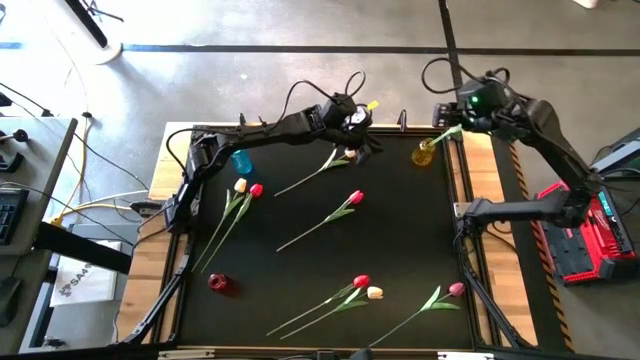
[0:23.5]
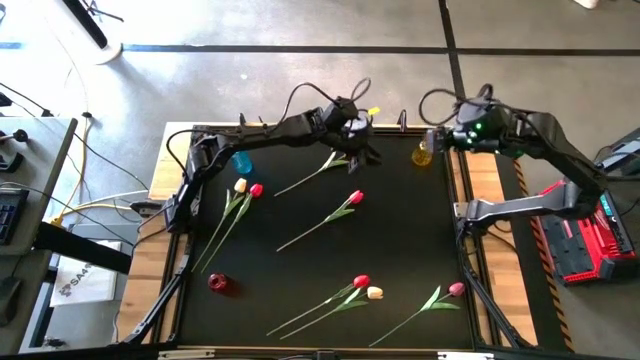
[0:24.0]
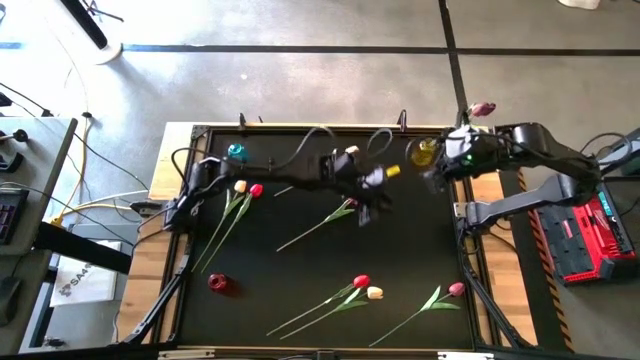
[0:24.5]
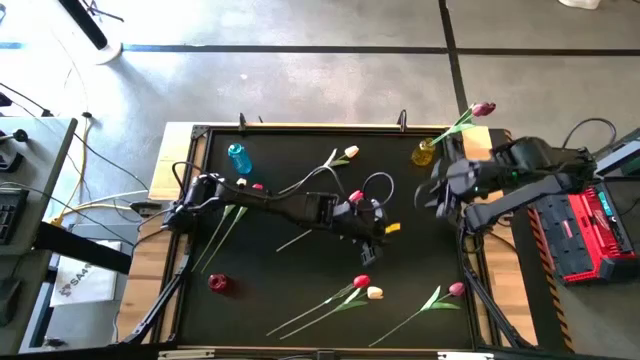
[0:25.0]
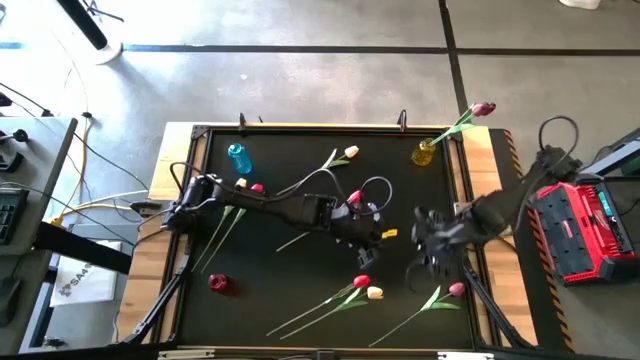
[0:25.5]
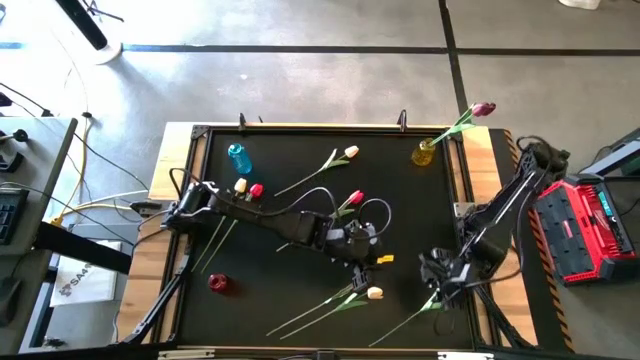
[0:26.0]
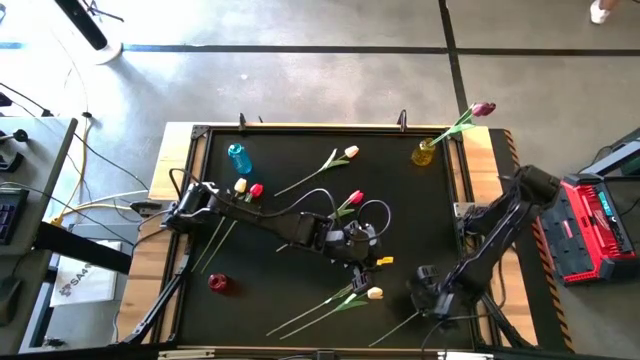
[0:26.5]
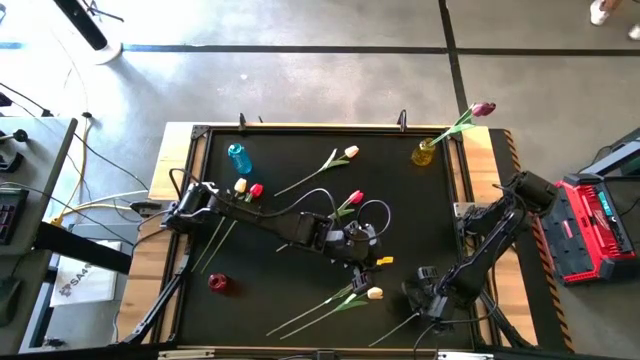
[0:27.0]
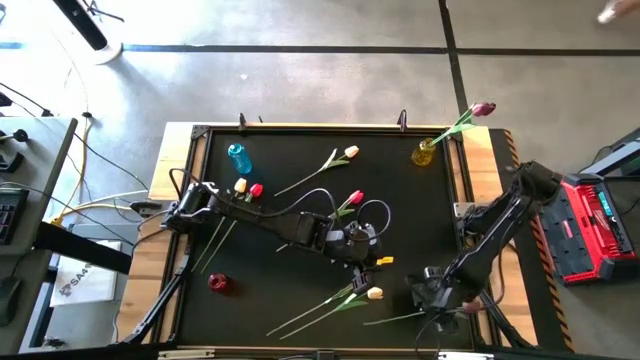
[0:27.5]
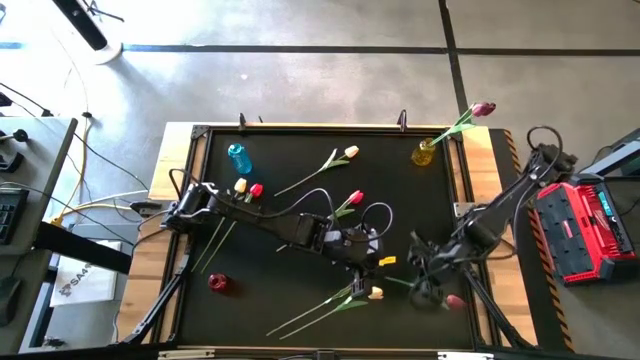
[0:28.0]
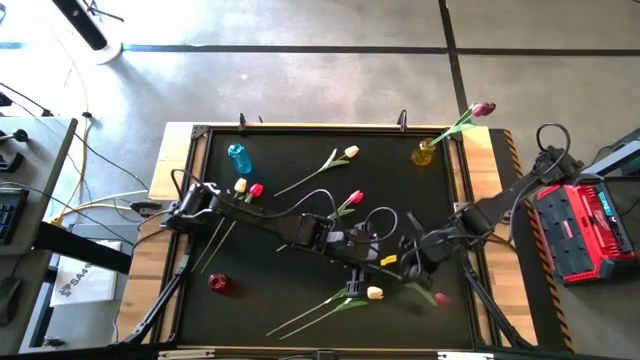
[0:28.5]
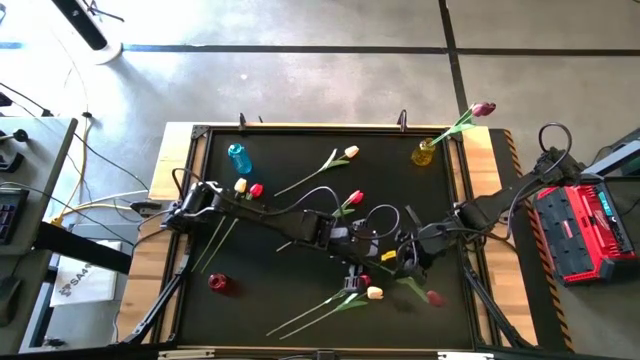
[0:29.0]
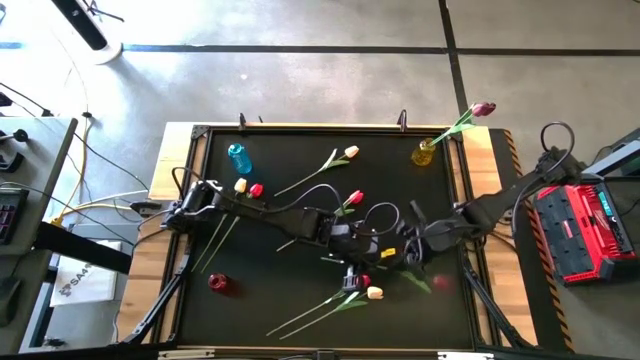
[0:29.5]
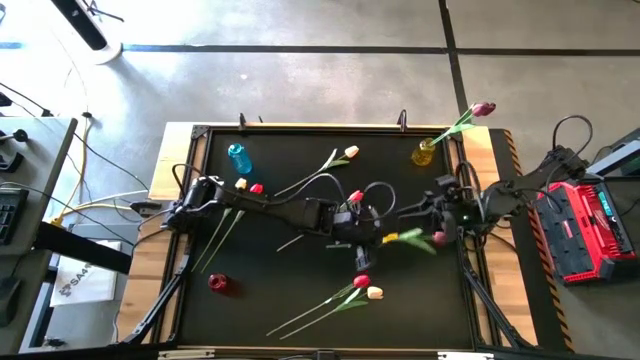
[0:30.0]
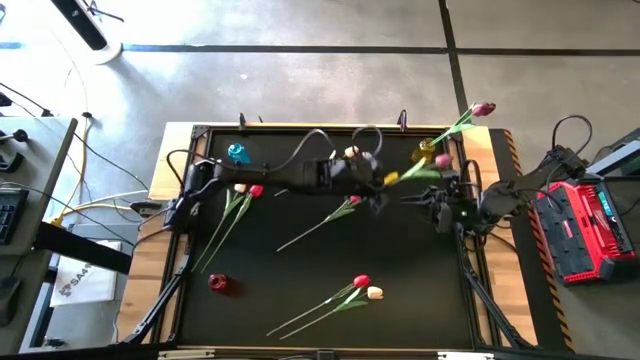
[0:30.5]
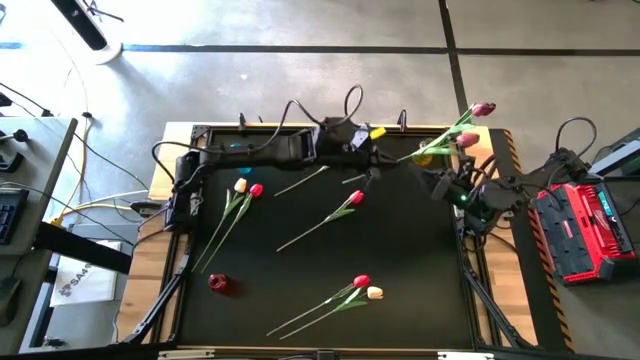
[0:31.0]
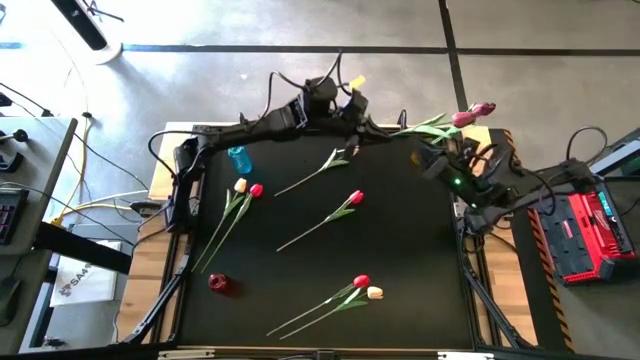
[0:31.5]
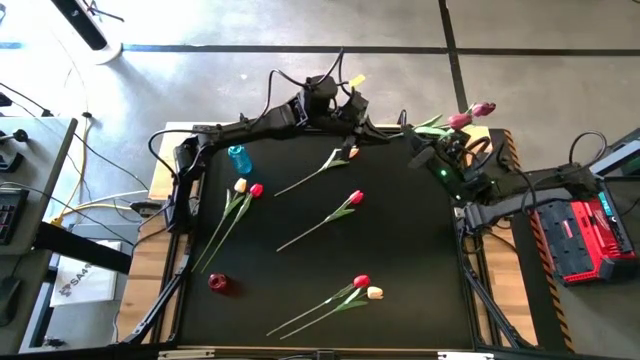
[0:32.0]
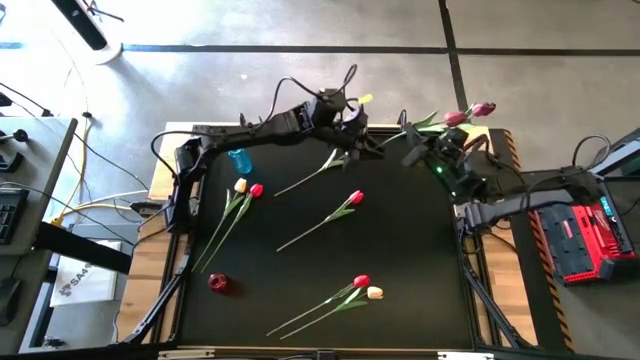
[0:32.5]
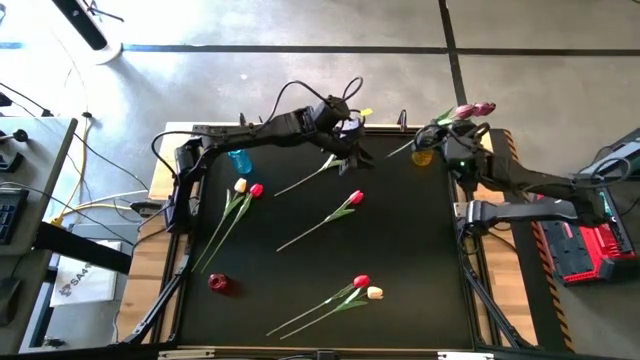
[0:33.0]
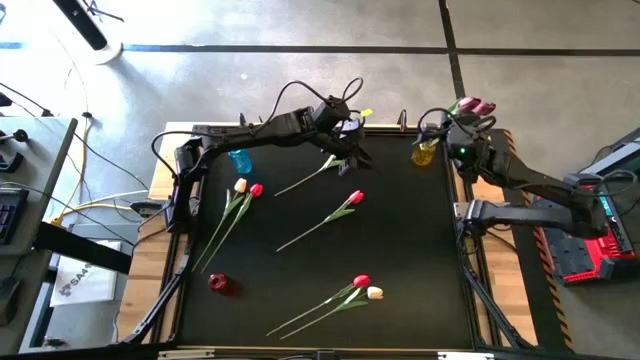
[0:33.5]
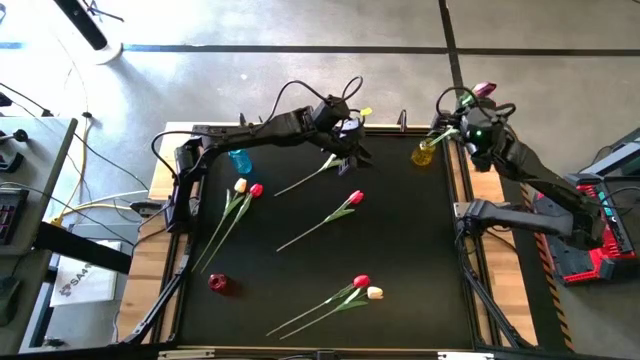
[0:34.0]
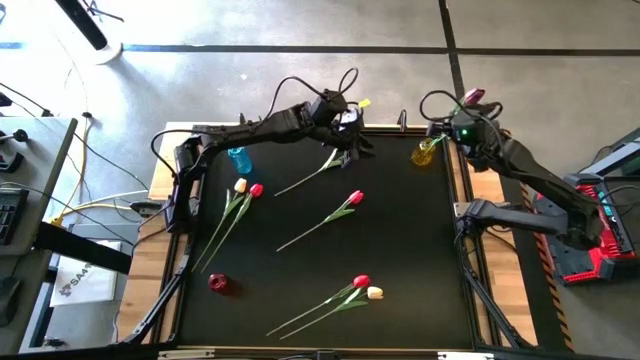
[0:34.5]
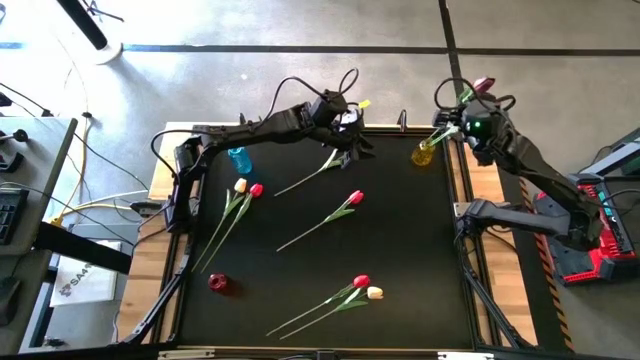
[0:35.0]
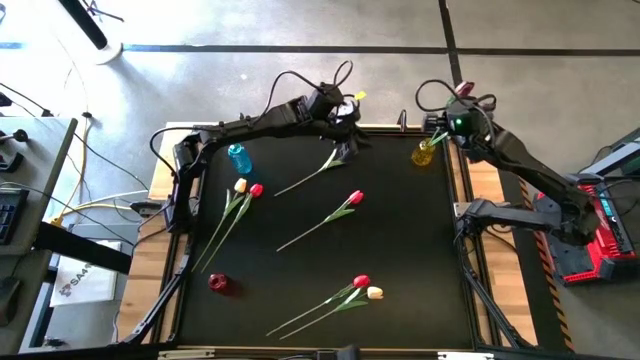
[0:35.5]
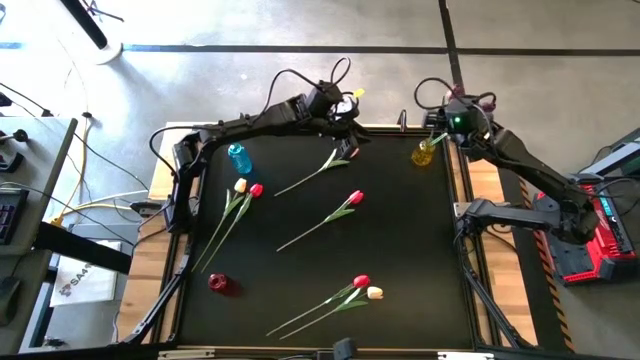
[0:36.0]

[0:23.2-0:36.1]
Task: Sort flowers into vase by color
Put the dark red flower into the yellow vase

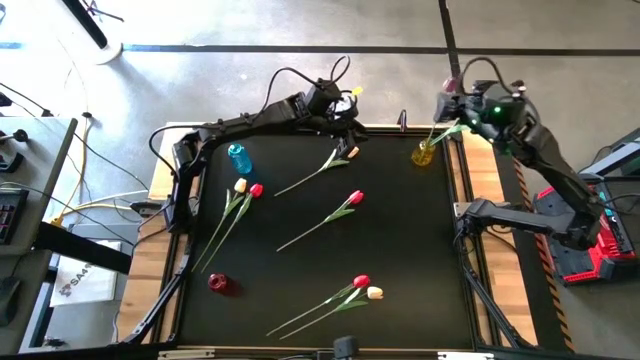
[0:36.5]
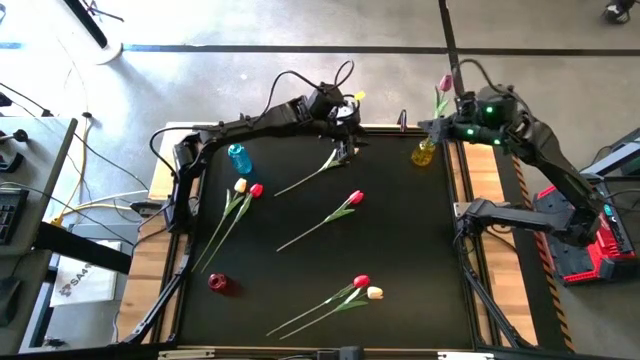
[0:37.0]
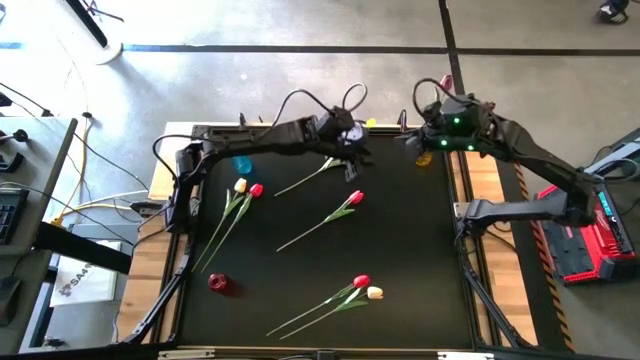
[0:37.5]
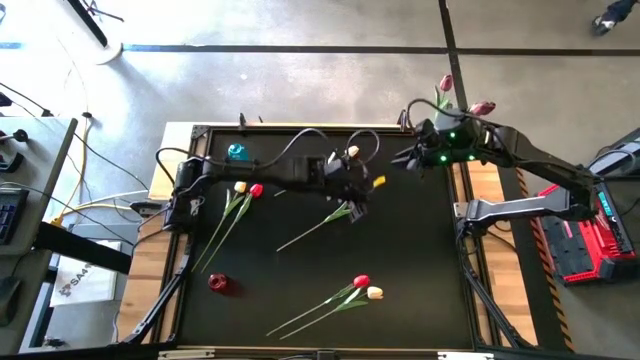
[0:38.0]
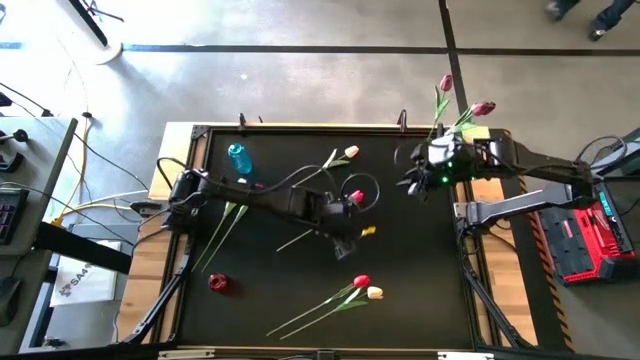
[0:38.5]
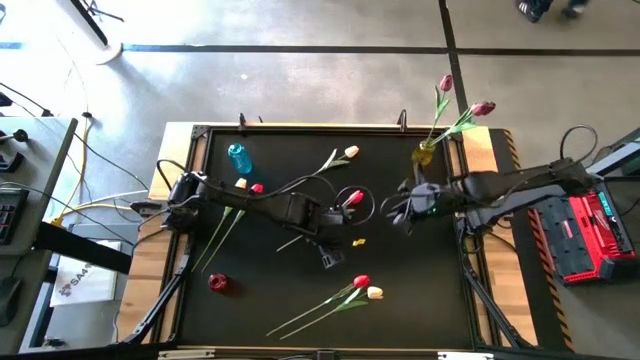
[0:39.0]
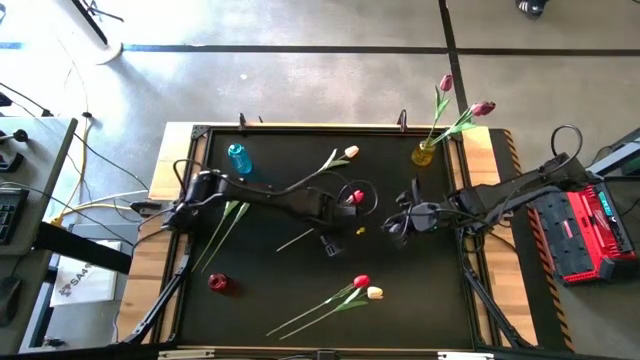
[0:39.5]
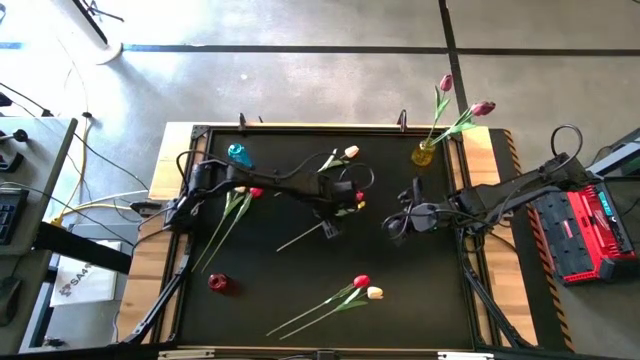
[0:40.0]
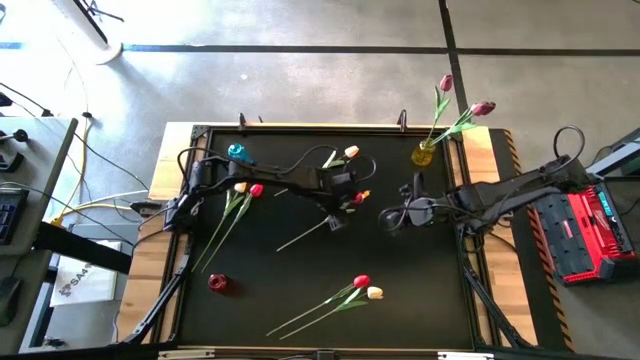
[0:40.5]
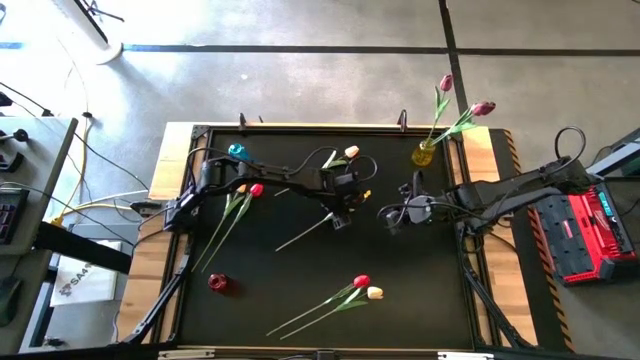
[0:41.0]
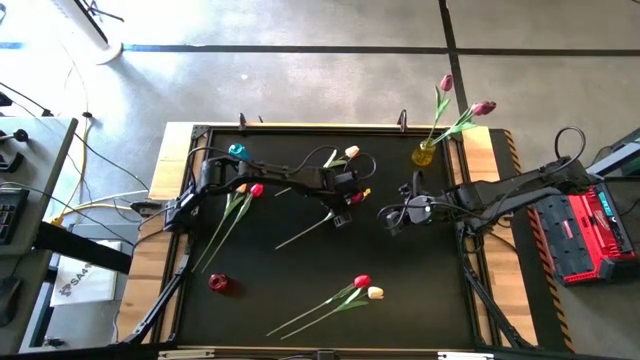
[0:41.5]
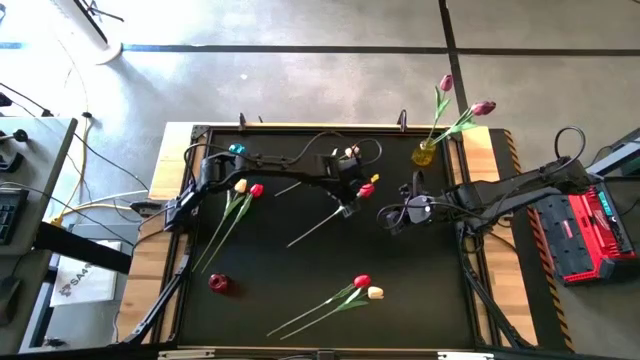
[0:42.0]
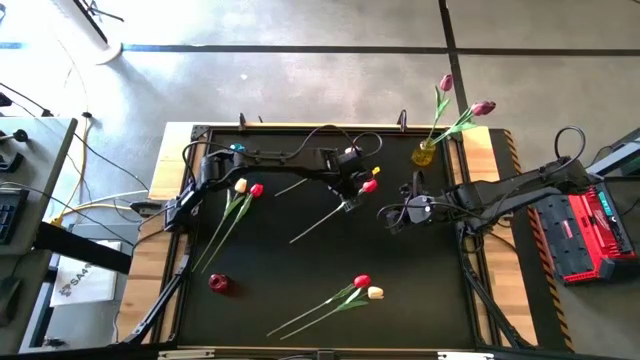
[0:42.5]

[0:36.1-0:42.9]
Put the center light red flower into the blue vase

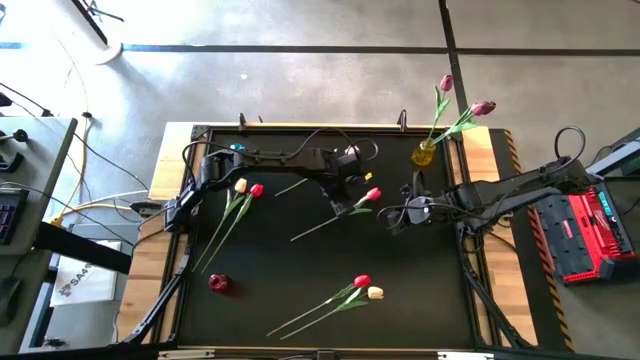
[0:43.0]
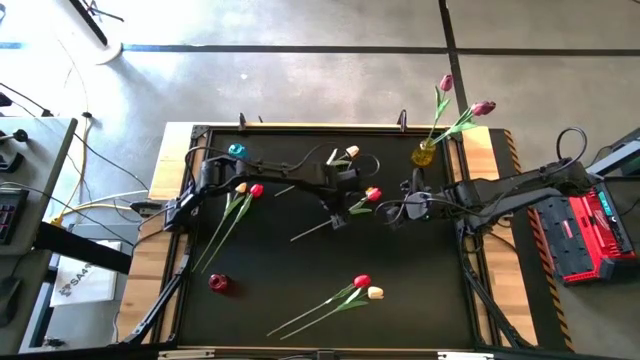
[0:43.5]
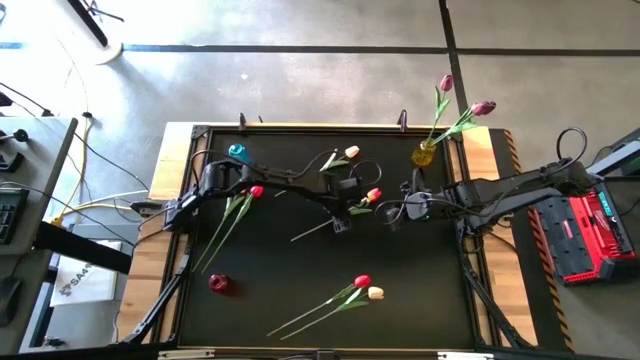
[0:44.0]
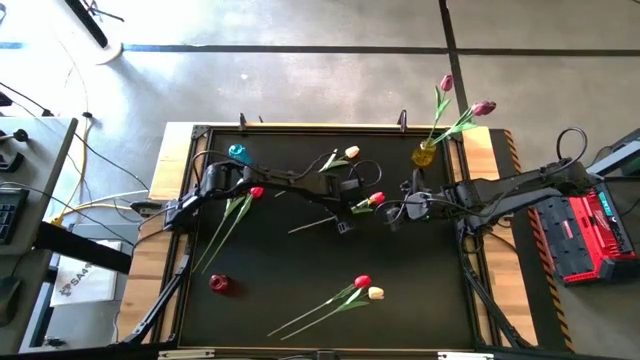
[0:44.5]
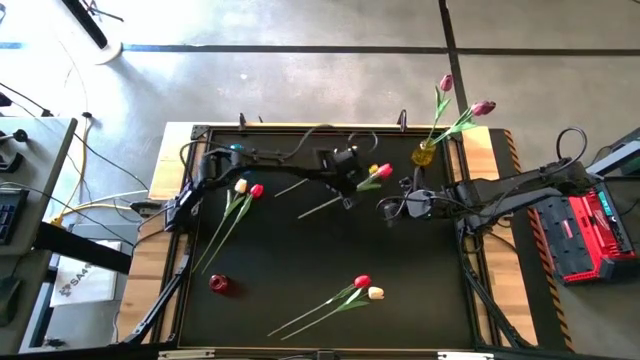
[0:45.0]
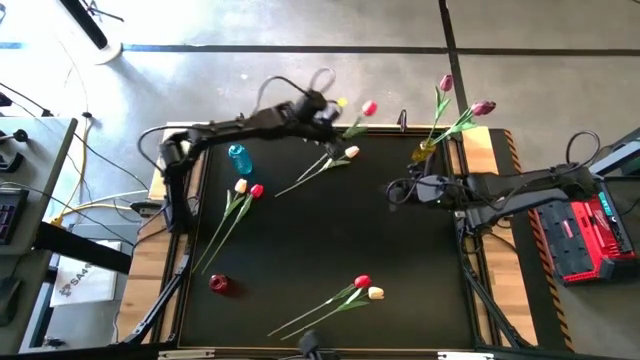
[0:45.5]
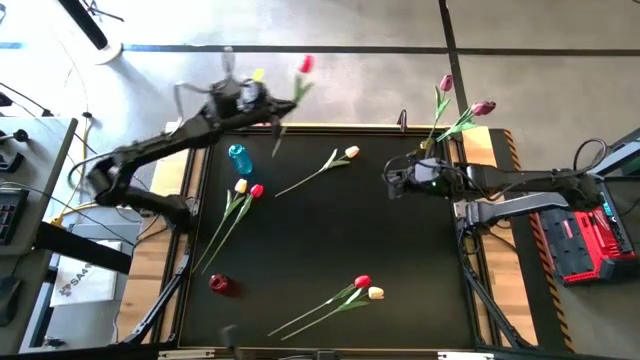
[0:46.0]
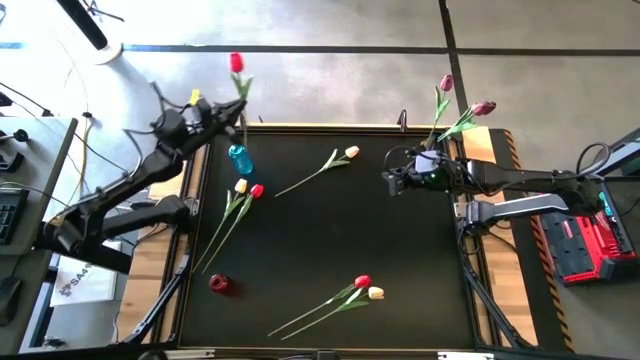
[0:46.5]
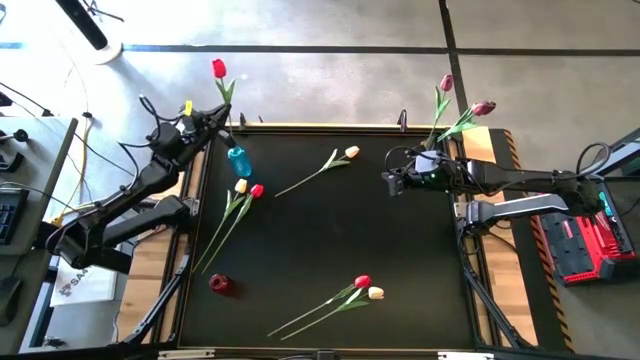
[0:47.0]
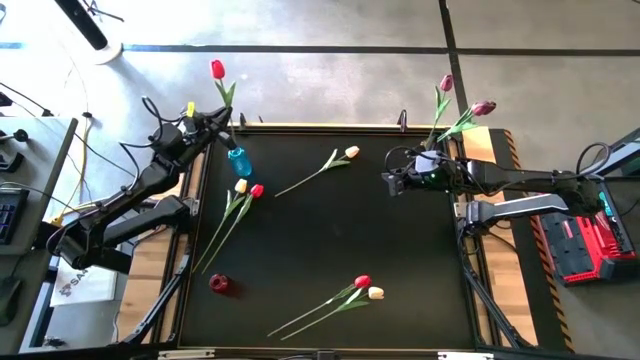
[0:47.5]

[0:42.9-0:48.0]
Put the center light red flower into the blue vase
